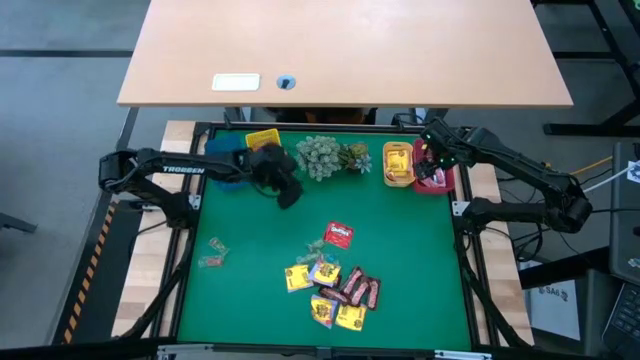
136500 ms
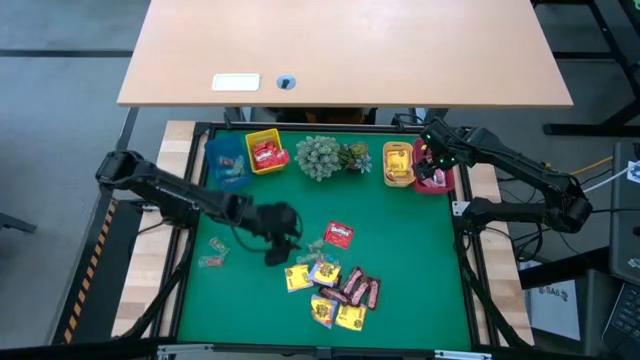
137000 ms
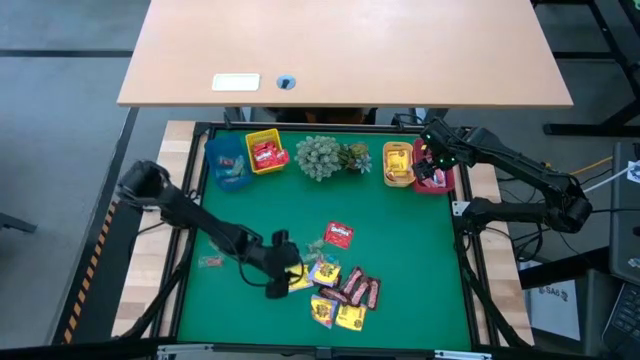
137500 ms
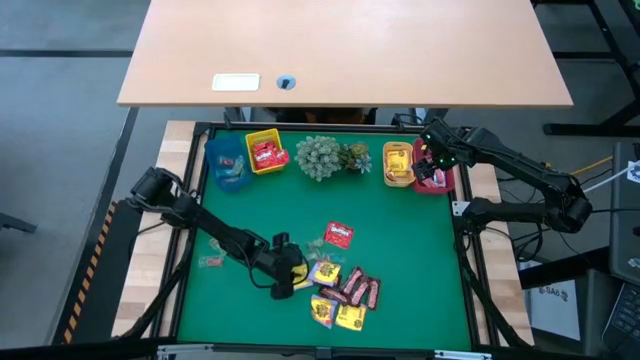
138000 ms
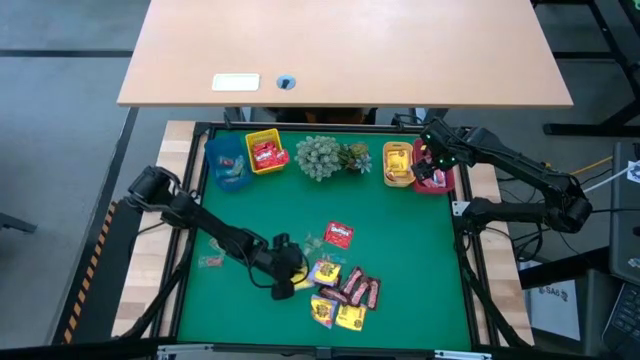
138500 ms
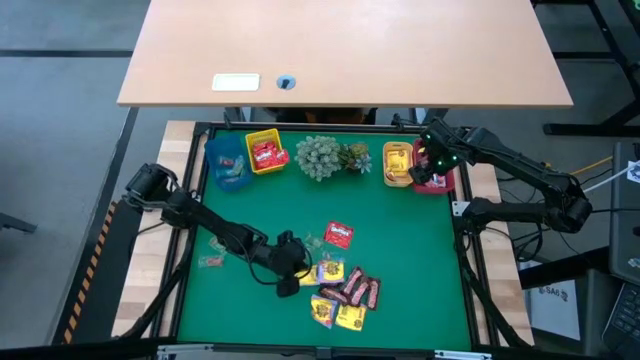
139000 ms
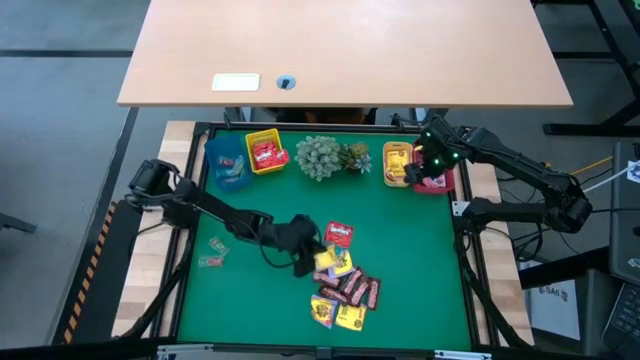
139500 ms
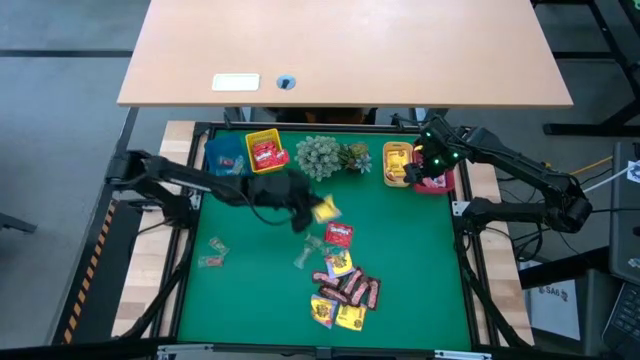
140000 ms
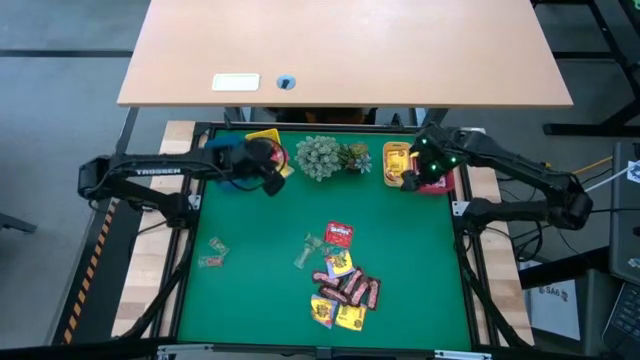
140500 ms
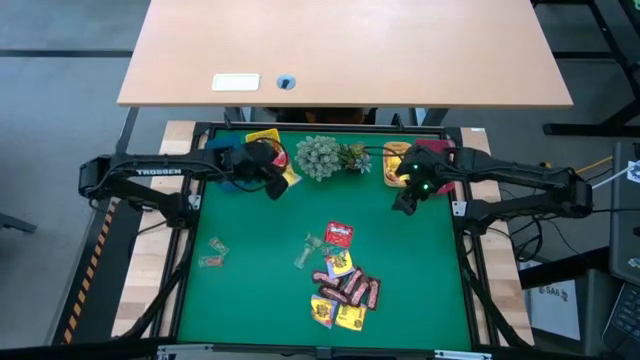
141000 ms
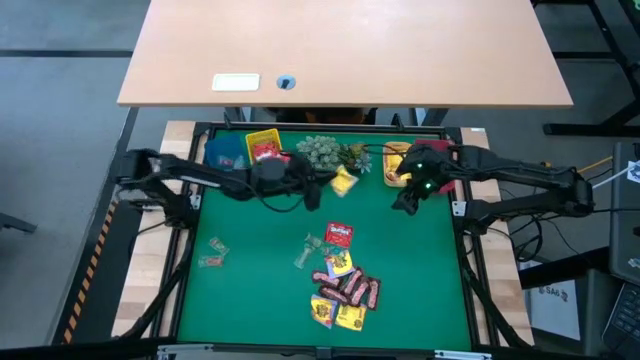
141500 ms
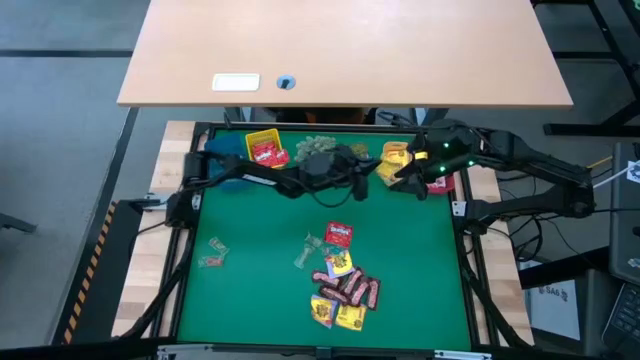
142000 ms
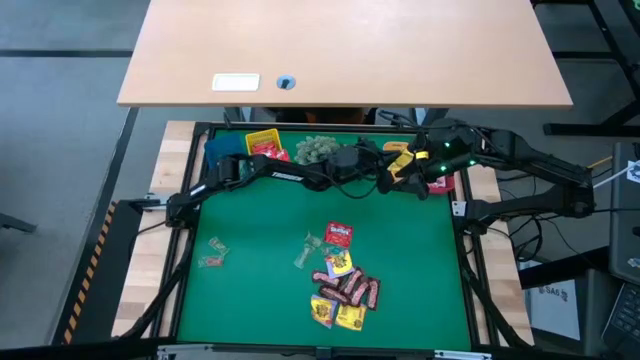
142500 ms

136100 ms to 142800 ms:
Task: Sort candy
Put the yellow candy into the orange bin

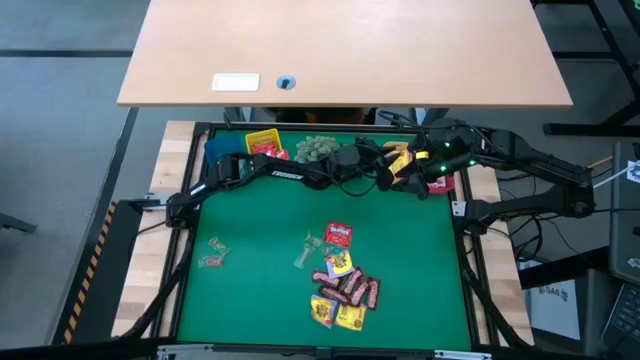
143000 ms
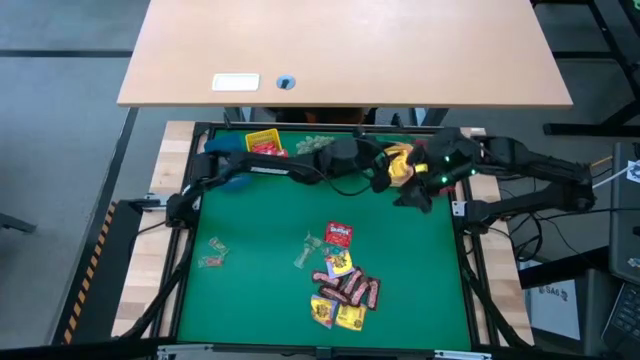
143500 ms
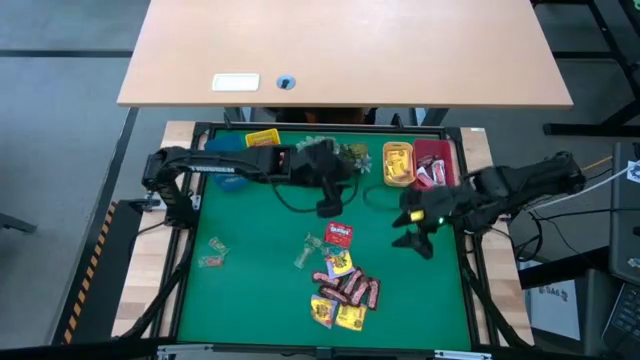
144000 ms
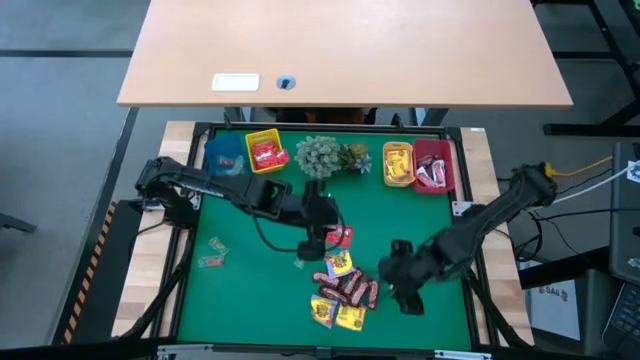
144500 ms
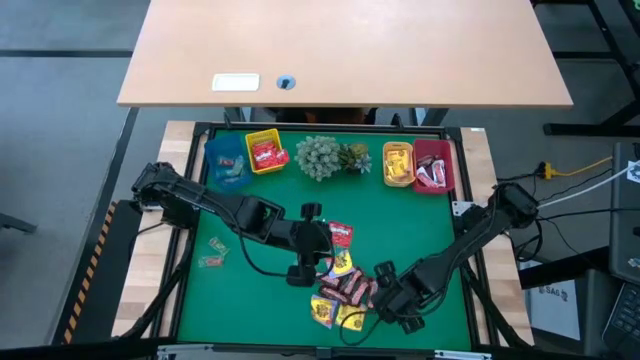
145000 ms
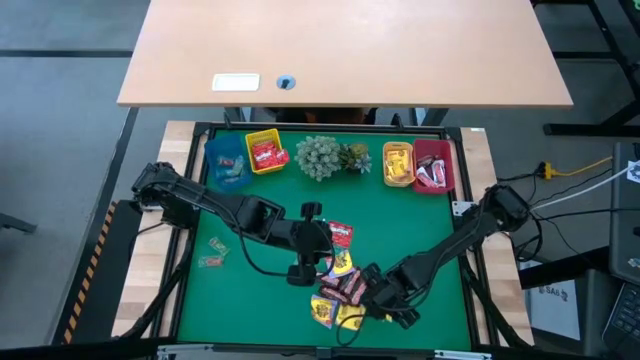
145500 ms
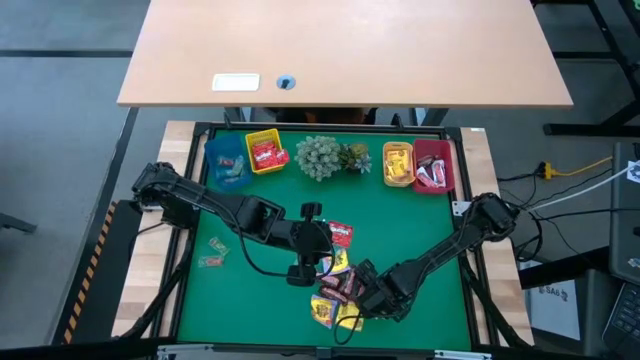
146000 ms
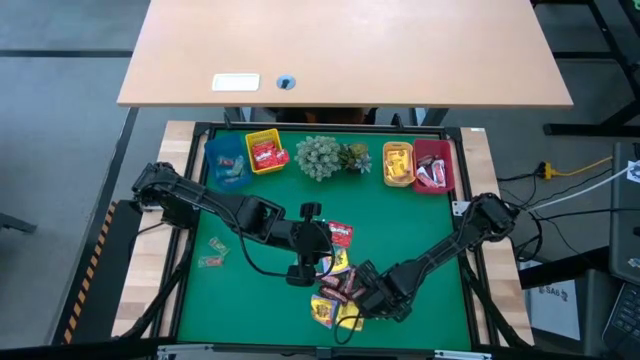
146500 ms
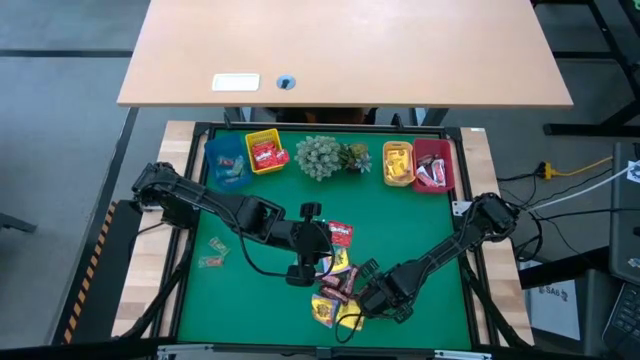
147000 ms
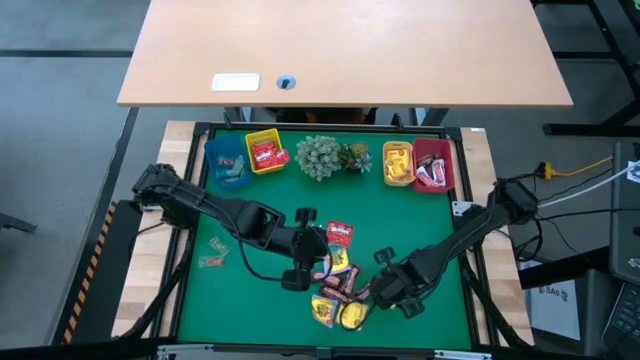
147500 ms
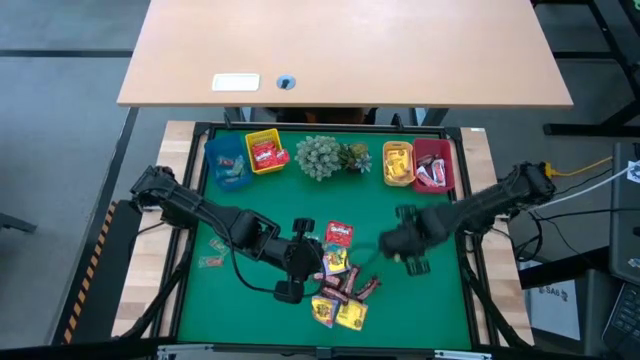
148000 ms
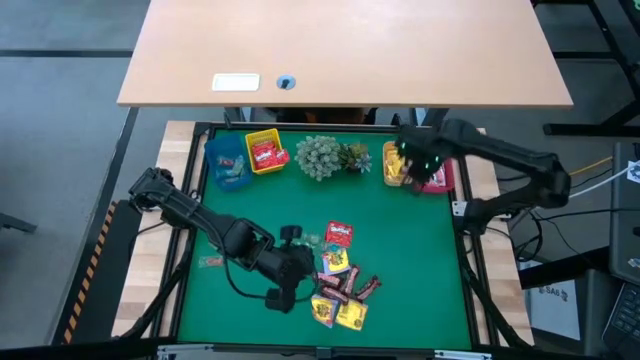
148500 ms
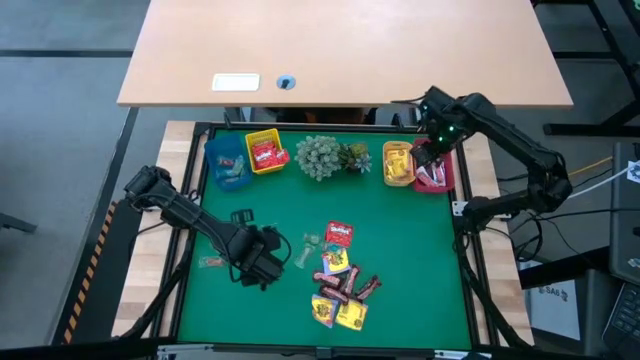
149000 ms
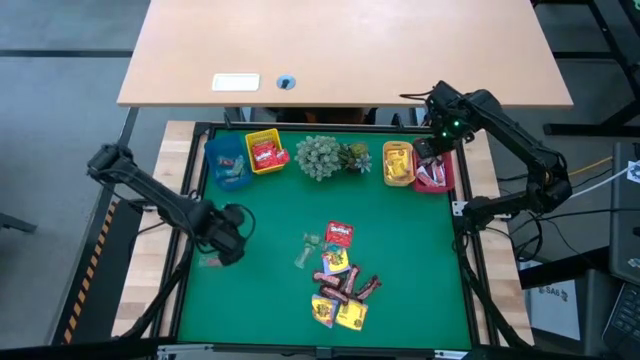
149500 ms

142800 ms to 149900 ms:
Put the brown chocolate into the blue bin

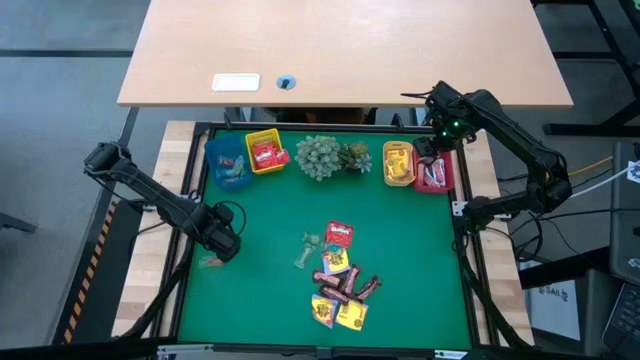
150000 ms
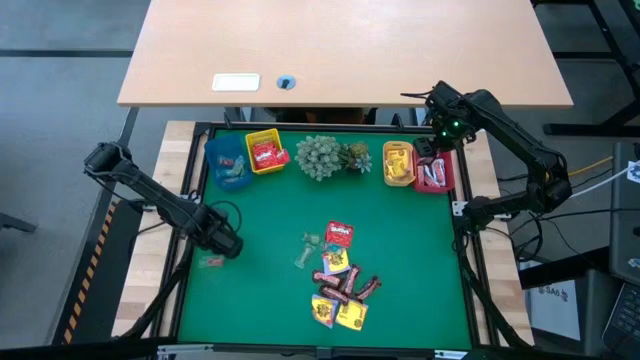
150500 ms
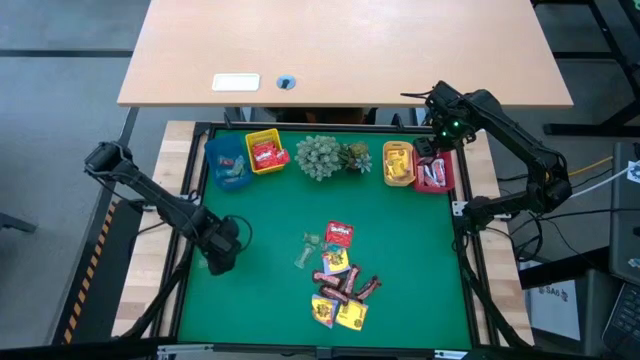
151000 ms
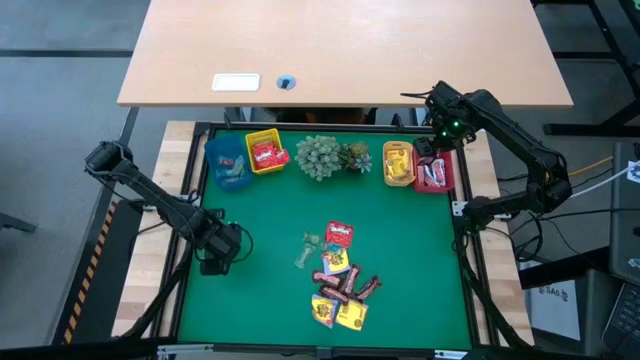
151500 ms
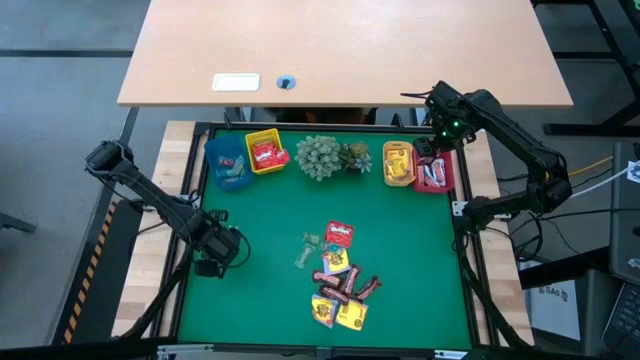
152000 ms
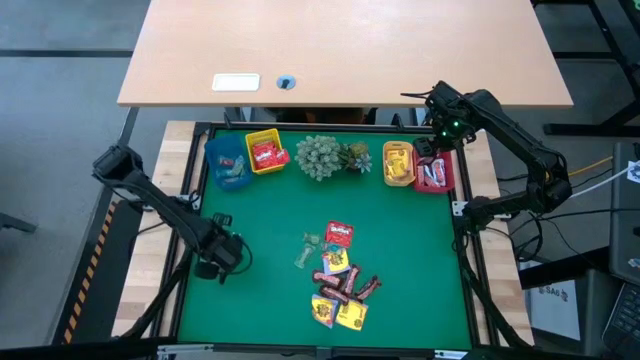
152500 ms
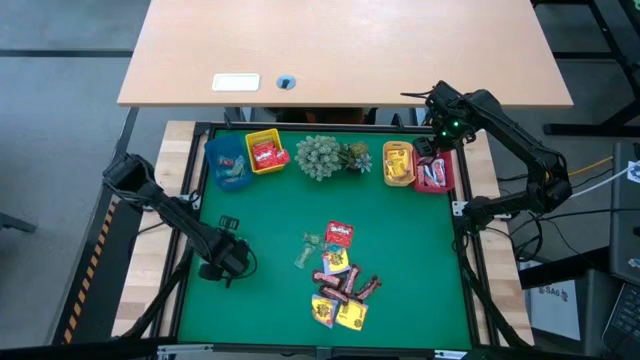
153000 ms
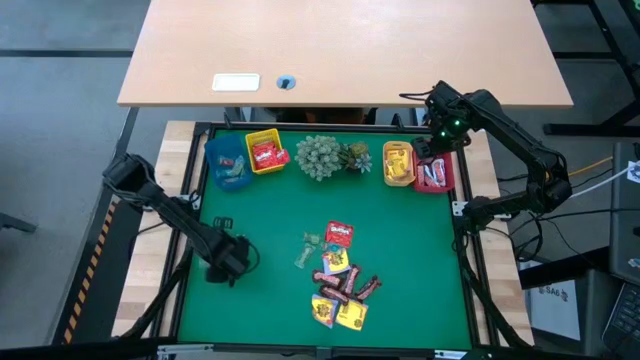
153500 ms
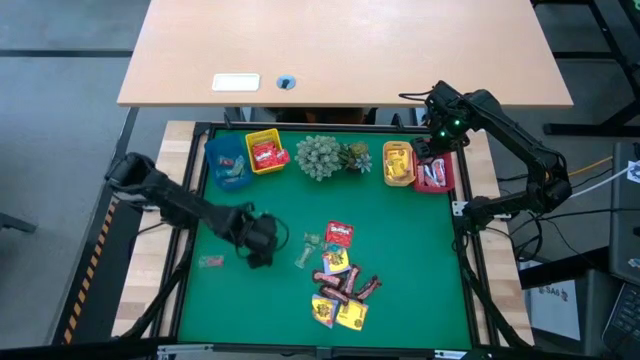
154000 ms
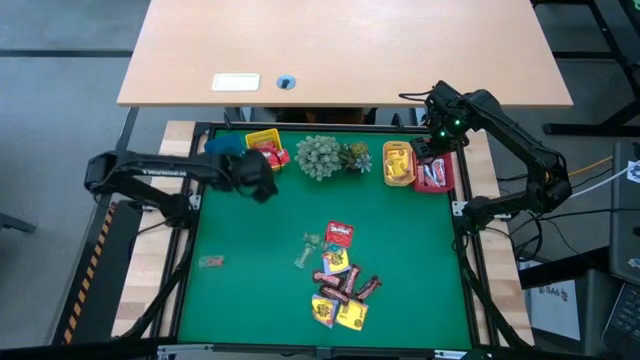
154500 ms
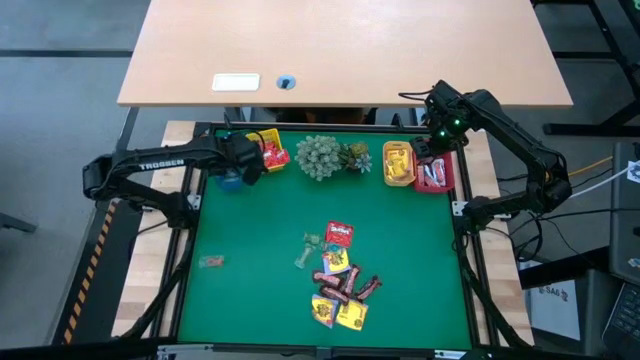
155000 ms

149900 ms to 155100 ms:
Put the green gummy into the blue bin

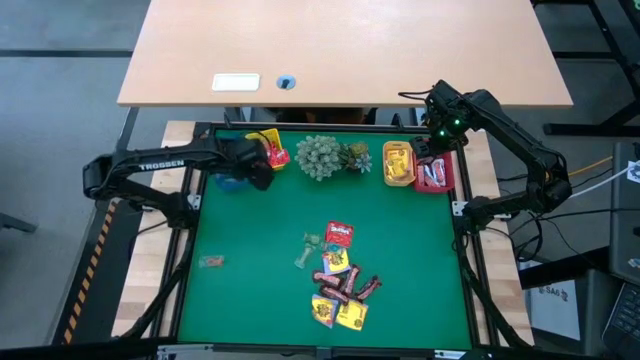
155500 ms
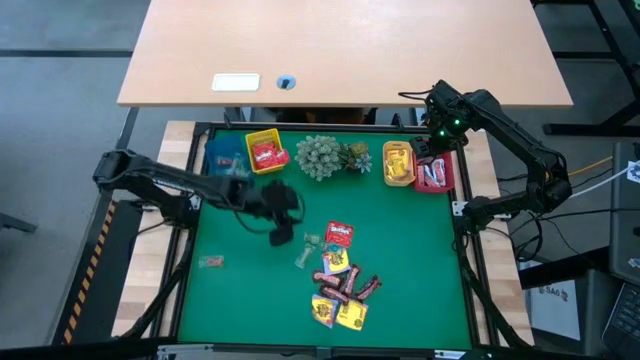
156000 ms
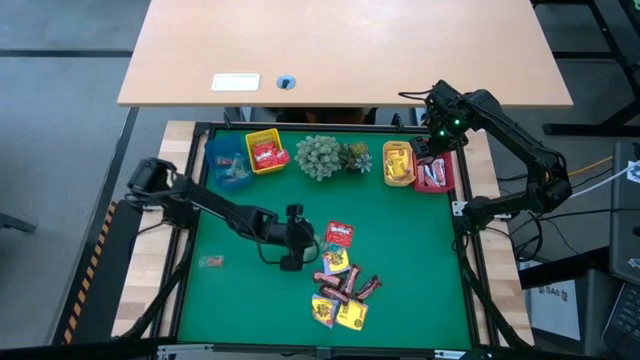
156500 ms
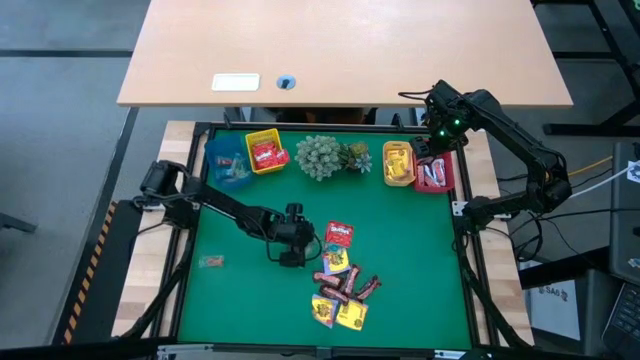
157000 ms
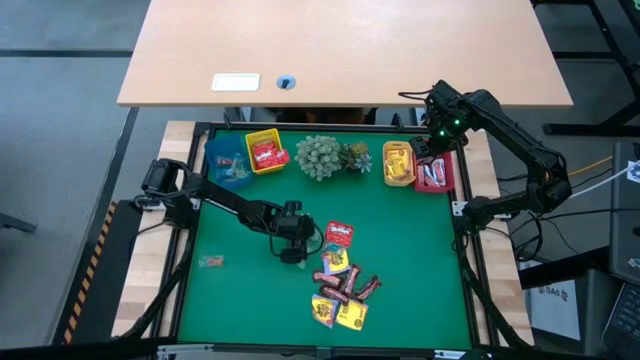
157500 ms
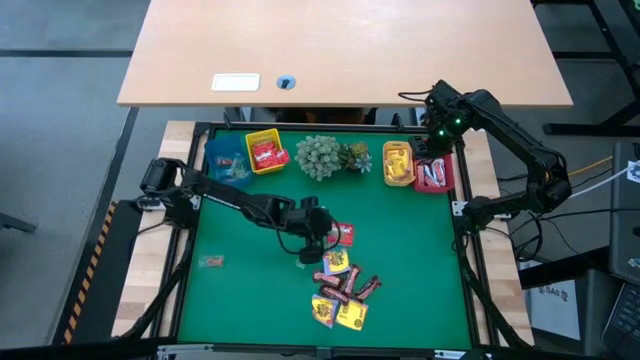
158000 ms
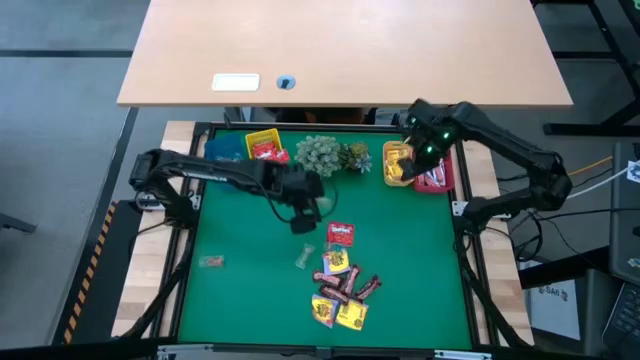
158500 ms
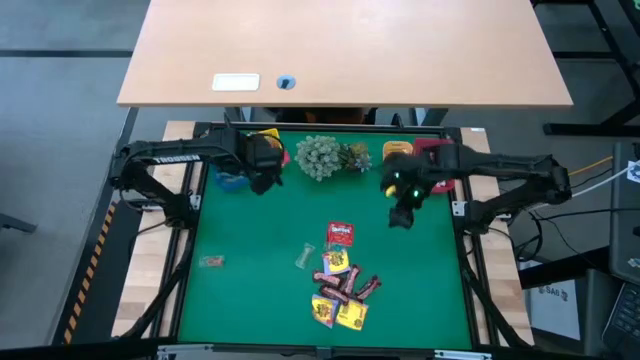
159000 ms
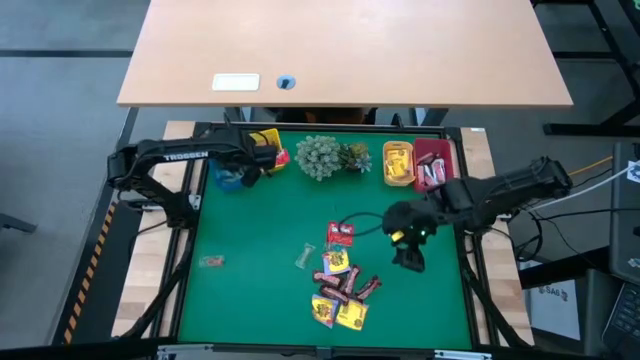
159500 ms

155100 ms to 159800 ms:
Put the green gummy into the blue bin
